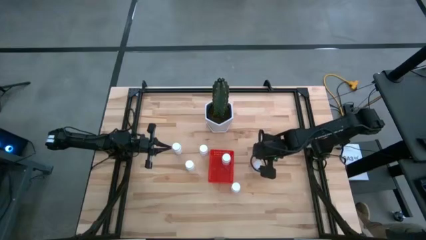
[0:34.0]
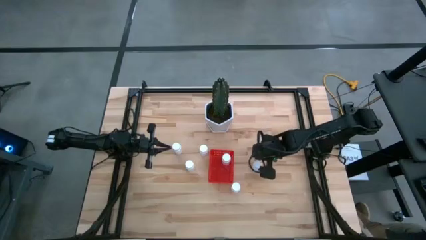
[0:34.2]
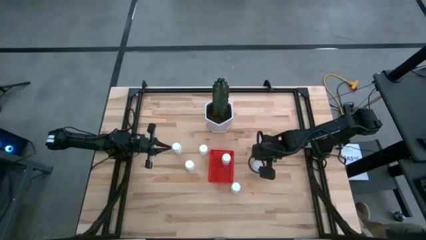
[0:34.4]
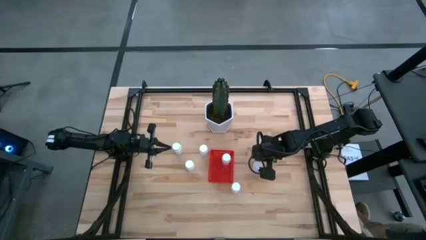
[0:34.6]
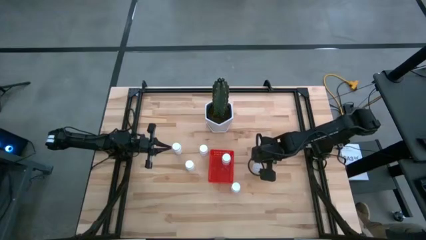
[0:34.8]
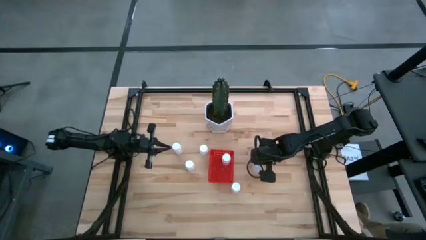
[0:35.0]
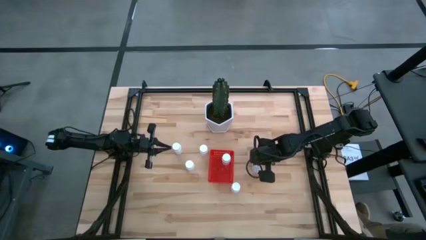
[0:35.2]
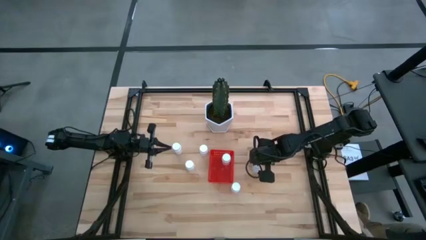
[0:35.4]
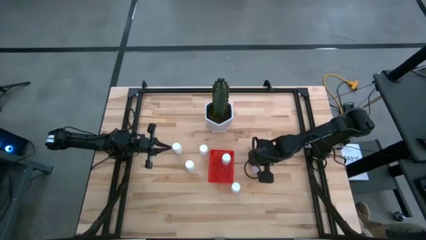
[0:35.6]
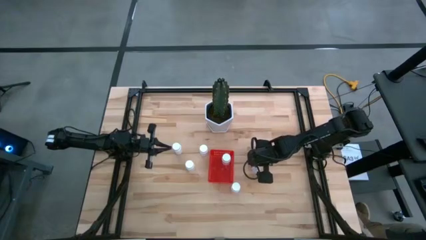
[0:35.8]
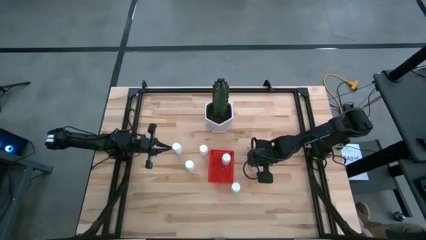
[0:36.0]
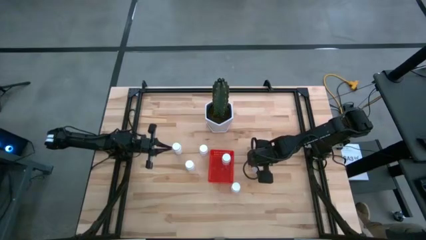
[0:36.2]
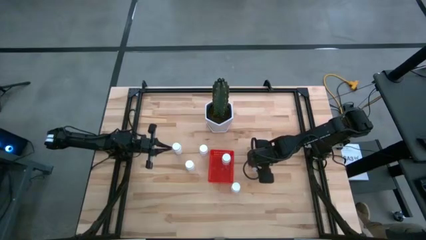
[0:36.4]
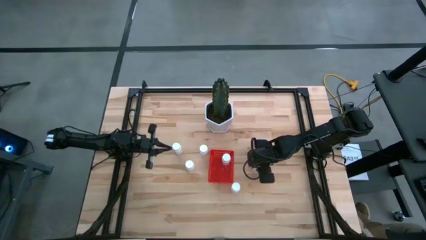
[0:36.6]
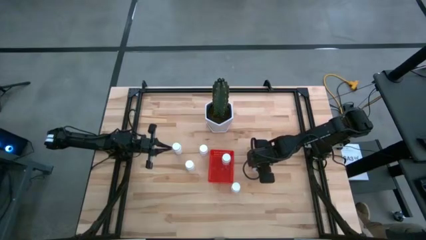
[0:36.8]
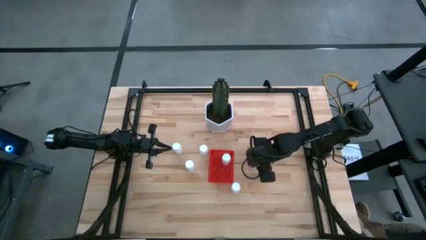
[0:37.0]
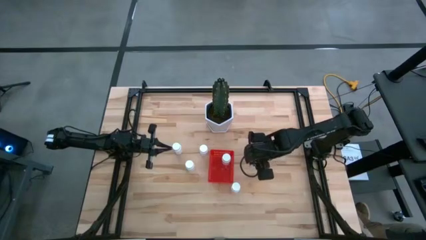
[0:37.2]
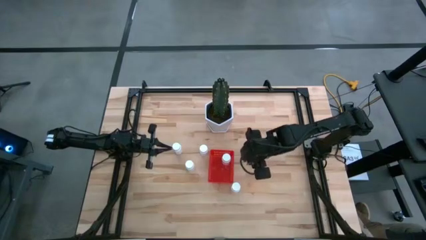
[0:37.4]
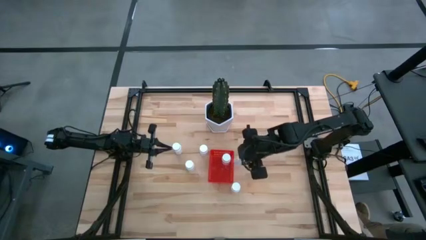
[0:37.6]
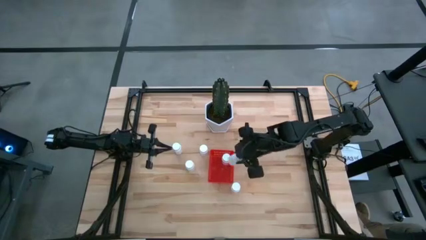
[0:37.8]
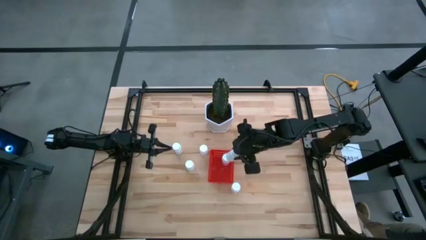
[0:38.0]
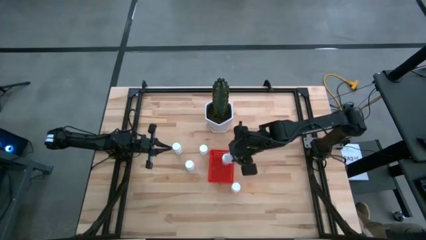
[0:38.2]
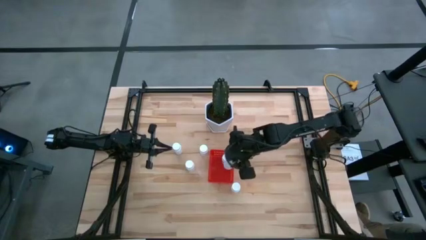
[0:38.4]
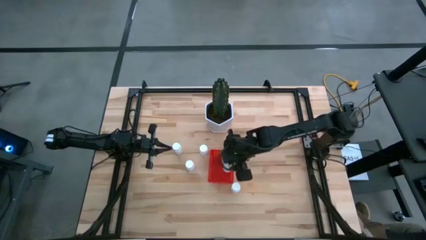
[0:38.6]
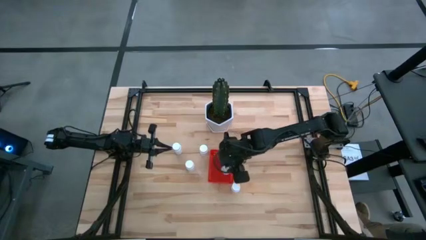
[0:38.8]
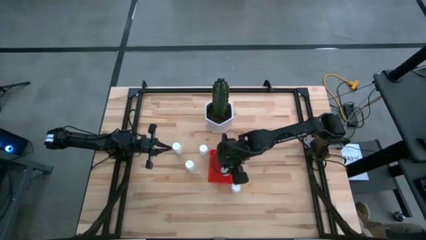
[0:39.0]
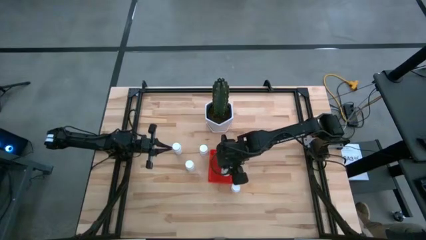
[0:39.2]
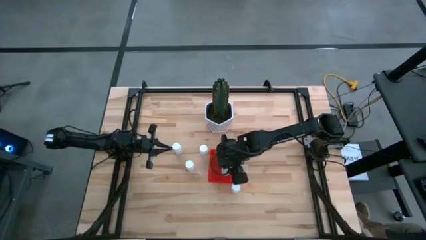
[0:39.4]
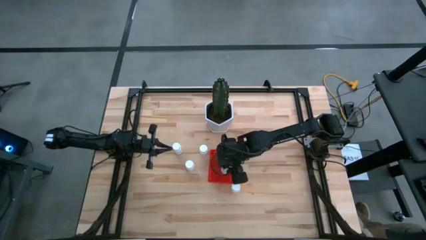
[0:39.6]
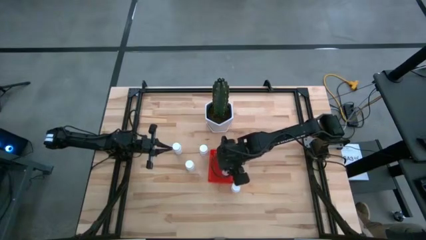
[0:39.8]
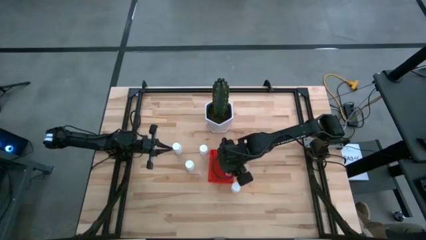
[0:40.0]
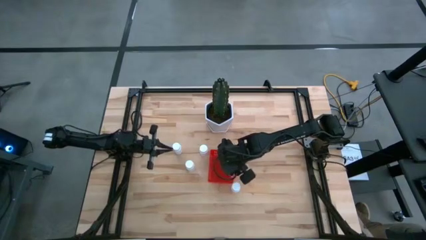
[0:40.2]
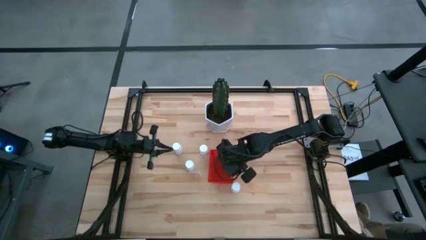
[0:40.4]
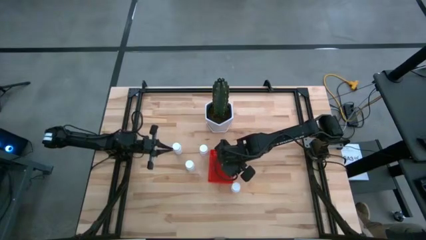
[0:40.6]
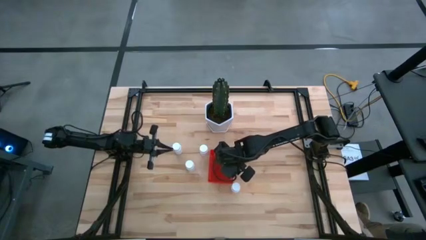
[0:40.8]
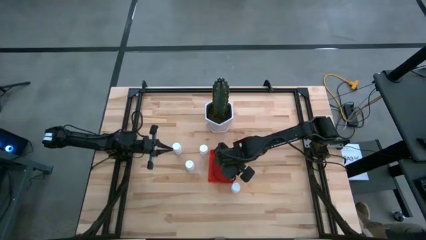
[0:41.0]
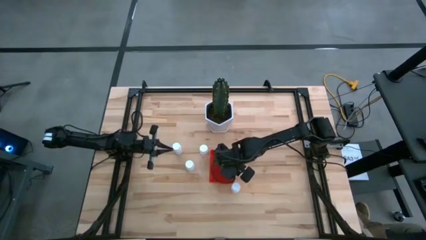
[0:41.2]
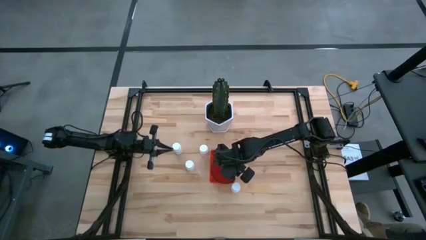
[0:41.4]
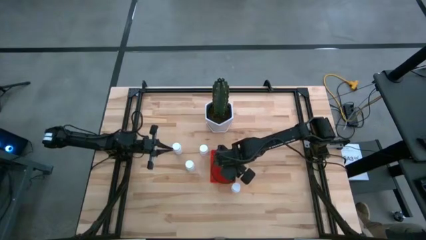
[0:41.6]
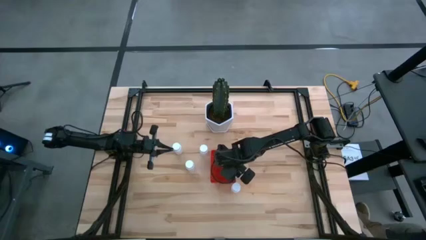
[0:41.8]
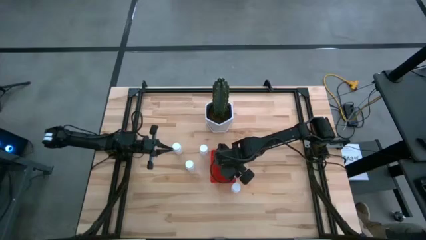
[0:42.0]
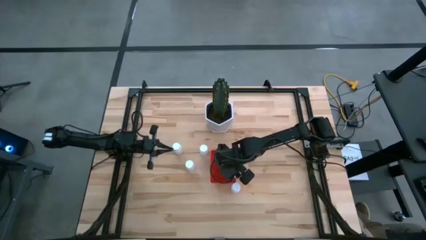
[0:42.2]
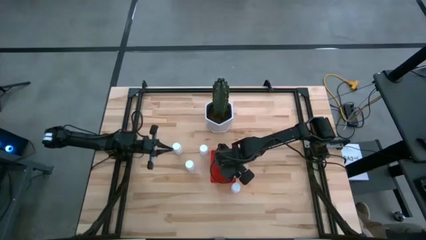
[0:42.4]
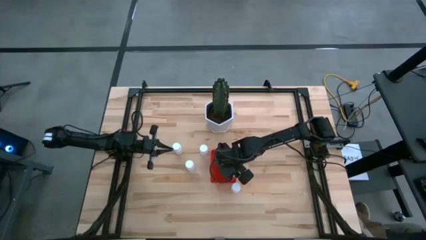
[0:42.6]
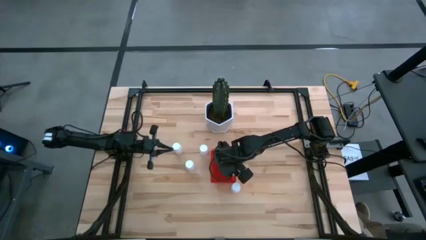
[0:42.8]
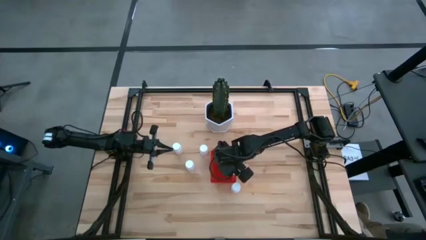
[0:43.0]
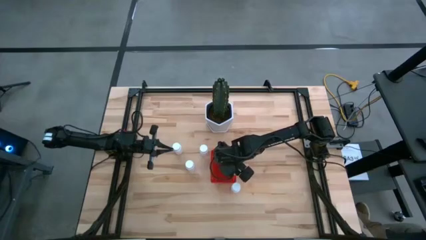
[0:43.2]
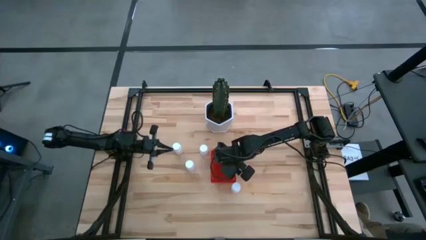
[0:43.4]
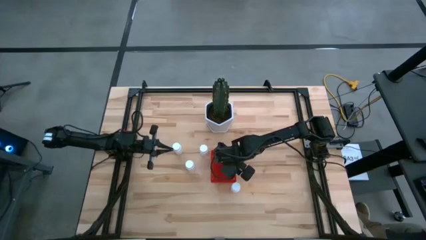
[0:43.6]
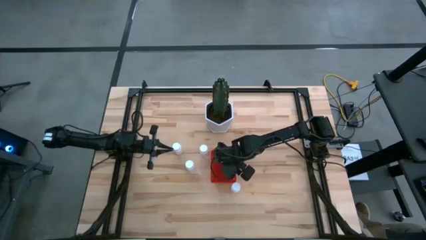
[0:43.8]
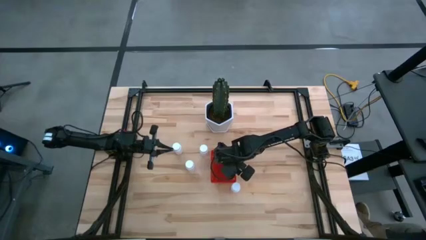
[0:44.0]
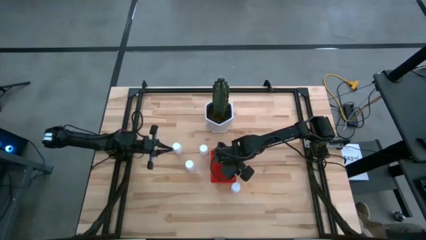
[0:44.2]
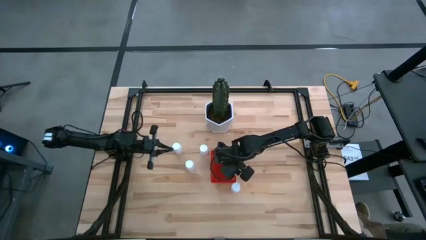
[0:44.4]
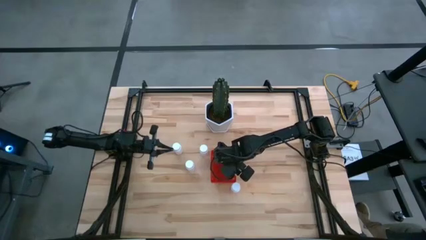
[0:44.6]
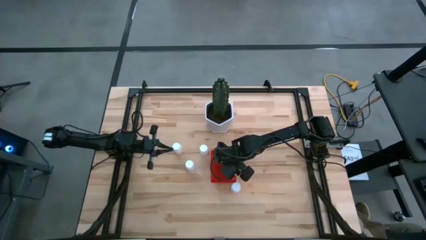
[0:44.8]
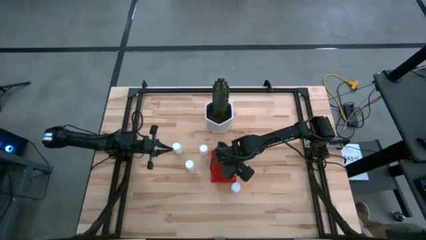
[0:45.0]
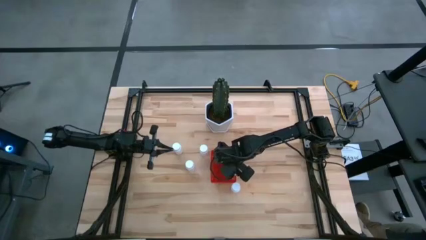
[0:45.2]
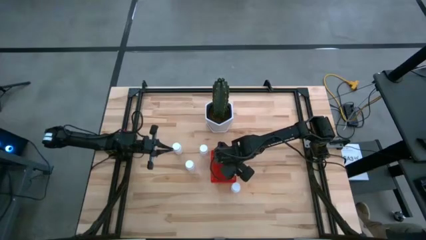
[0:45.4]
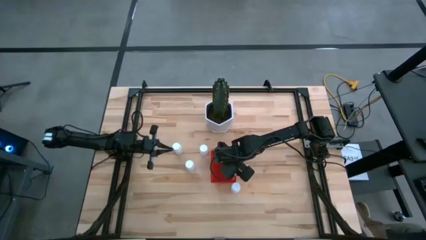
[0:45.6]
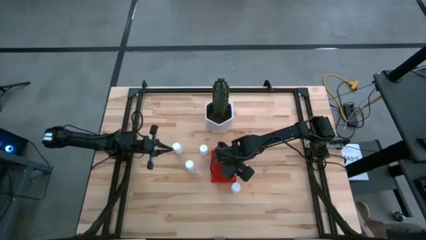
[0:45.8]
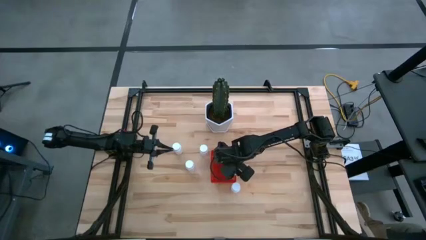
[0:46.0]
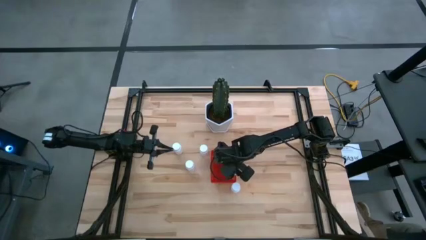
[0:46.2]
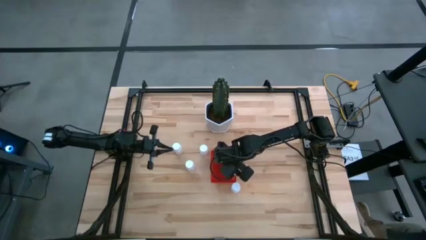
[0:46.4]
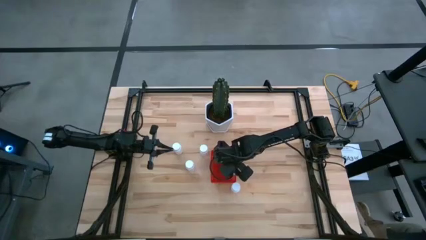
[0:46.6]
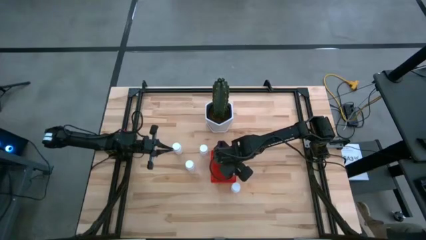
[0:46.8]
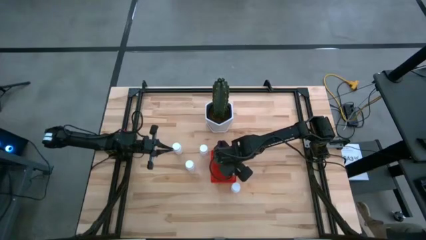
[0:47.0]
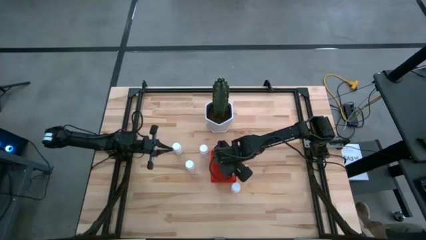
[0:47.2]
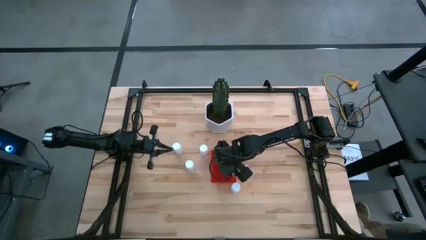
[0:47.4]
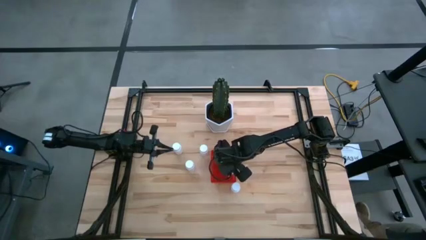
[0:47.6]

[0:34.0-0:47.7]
Task: Pick and place pill bottles into a basket
Put the white pill bottle into the red bin
